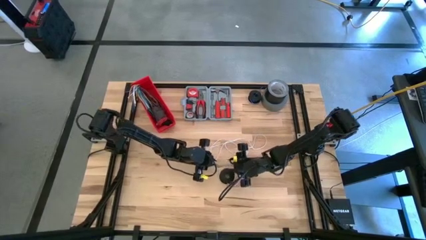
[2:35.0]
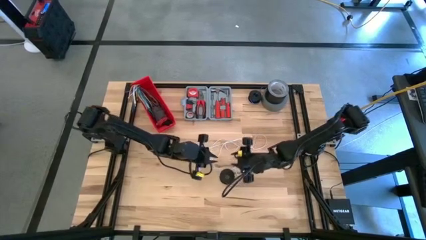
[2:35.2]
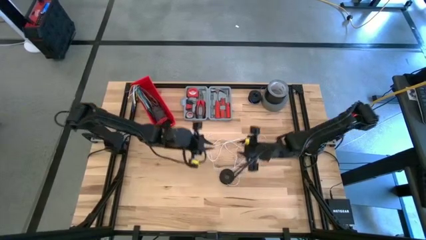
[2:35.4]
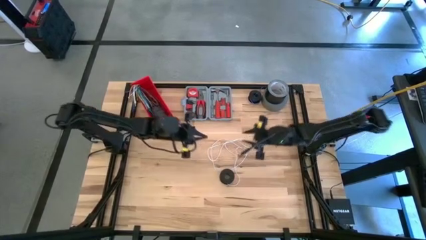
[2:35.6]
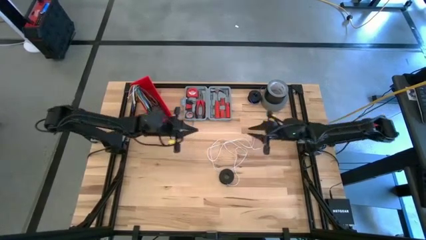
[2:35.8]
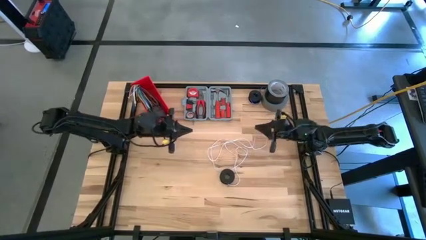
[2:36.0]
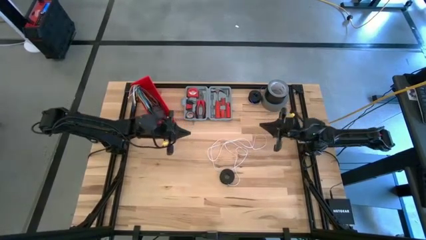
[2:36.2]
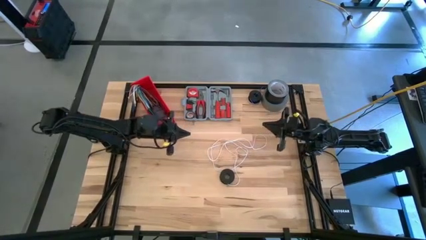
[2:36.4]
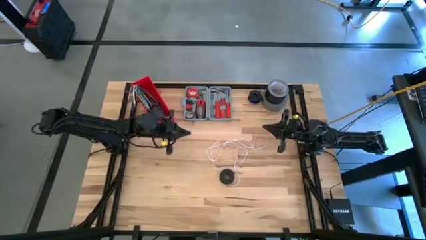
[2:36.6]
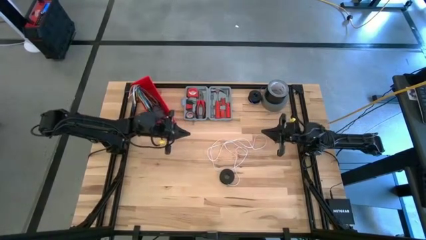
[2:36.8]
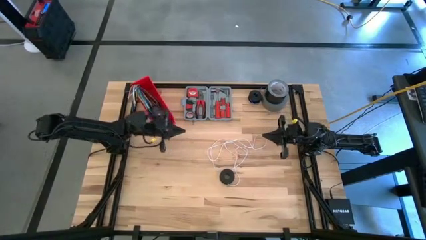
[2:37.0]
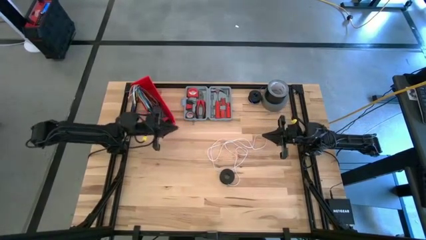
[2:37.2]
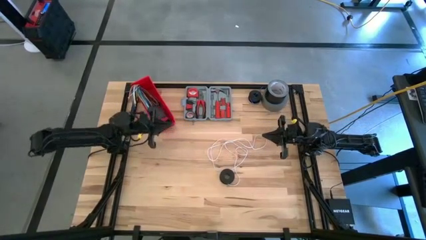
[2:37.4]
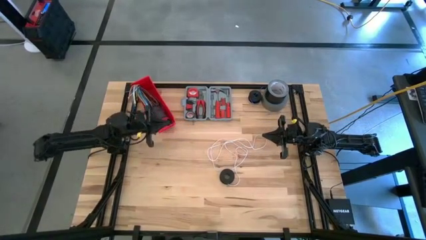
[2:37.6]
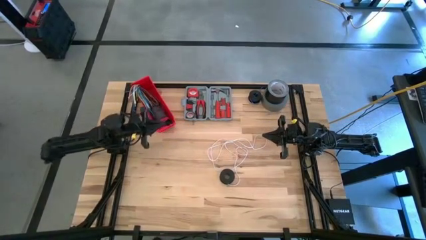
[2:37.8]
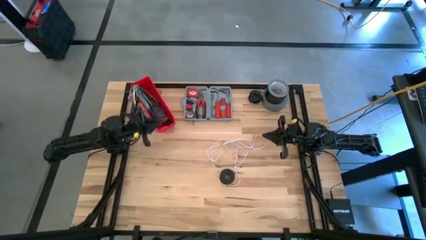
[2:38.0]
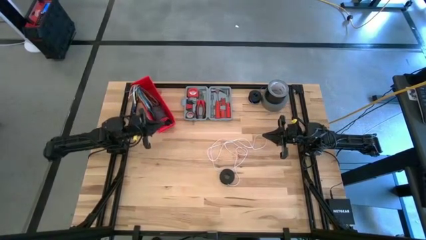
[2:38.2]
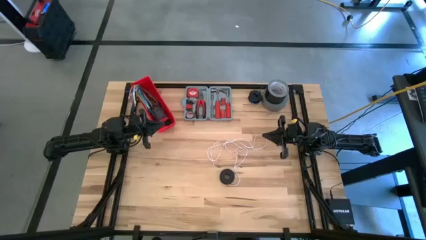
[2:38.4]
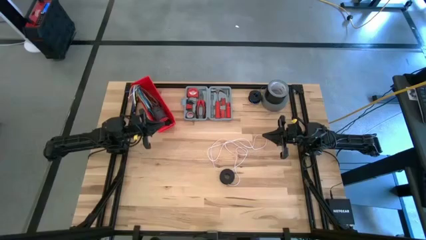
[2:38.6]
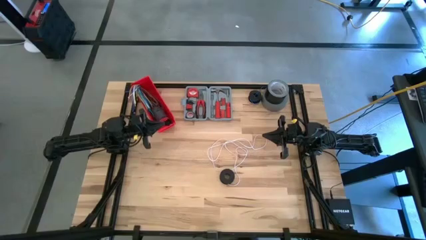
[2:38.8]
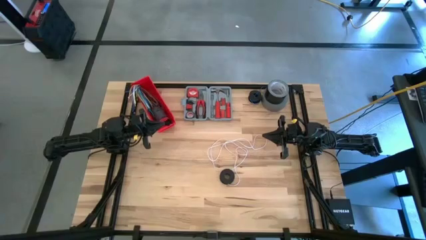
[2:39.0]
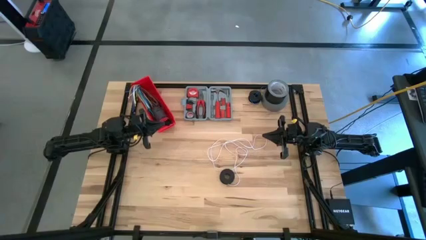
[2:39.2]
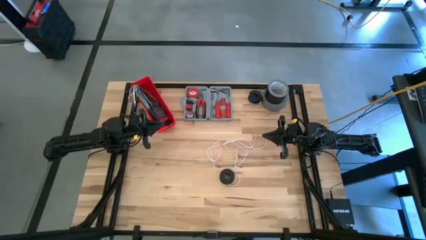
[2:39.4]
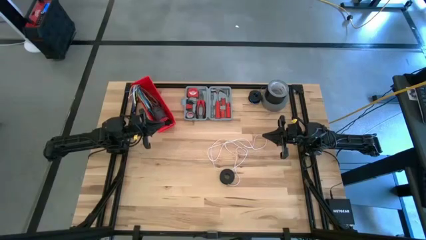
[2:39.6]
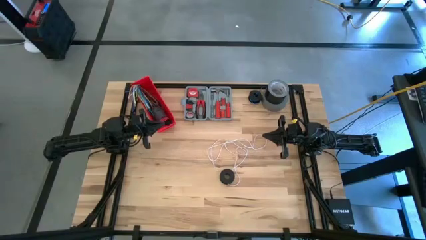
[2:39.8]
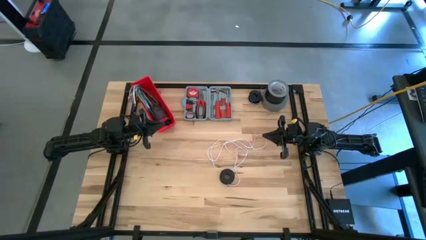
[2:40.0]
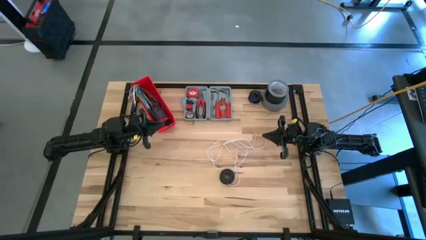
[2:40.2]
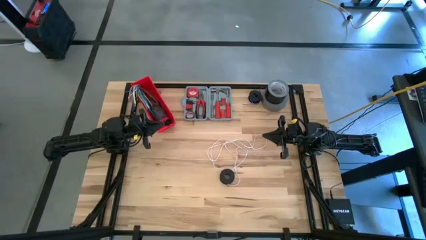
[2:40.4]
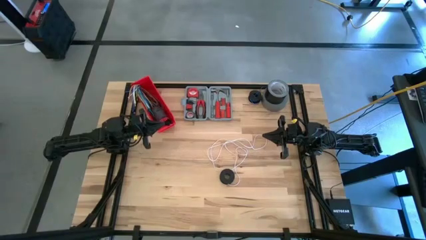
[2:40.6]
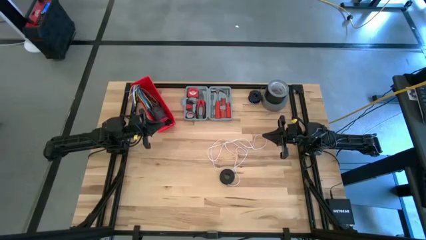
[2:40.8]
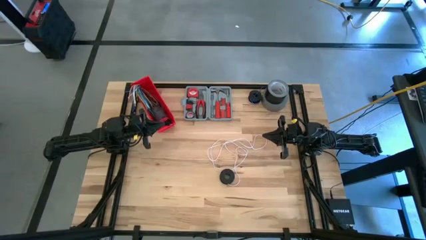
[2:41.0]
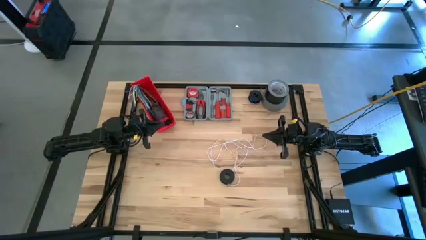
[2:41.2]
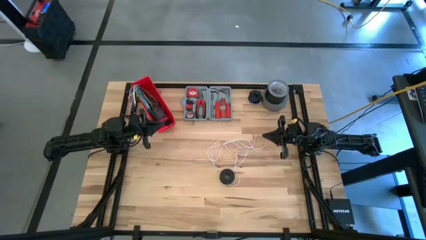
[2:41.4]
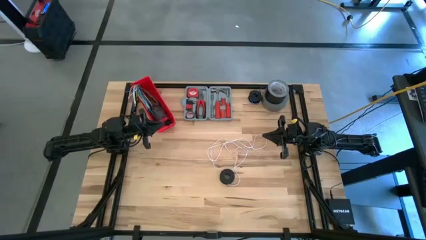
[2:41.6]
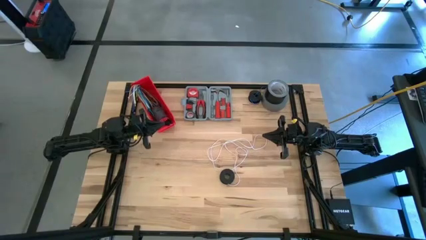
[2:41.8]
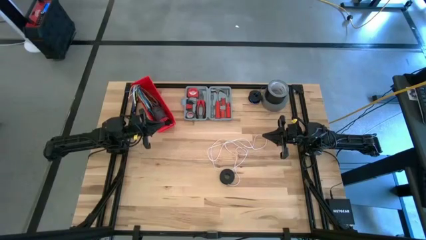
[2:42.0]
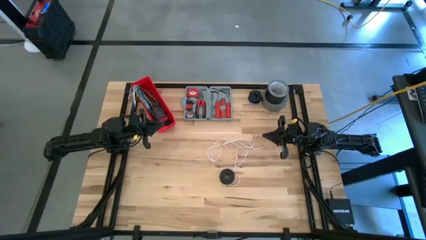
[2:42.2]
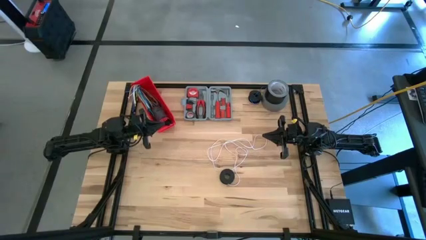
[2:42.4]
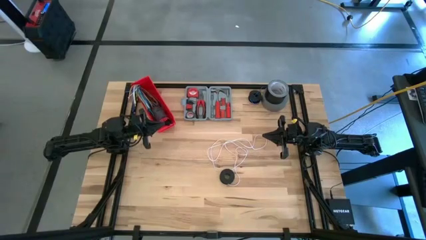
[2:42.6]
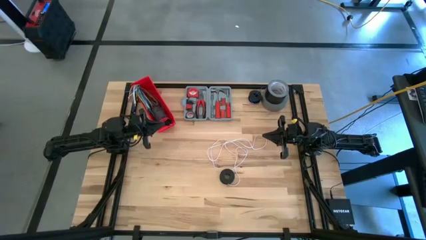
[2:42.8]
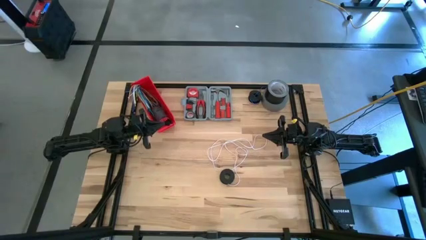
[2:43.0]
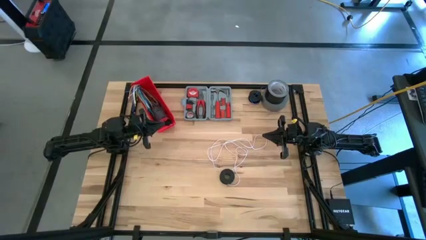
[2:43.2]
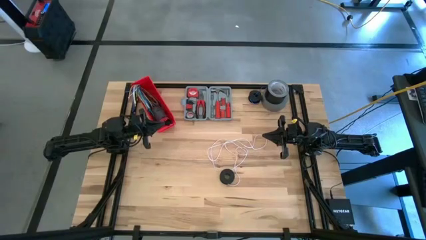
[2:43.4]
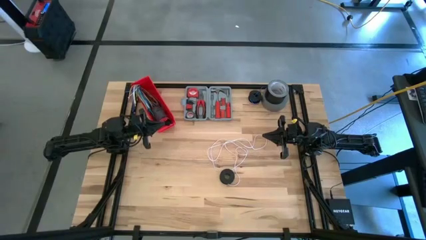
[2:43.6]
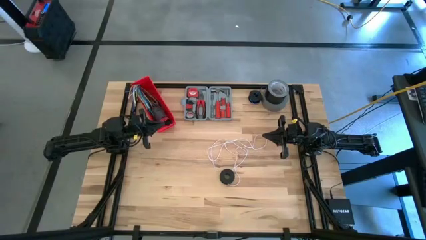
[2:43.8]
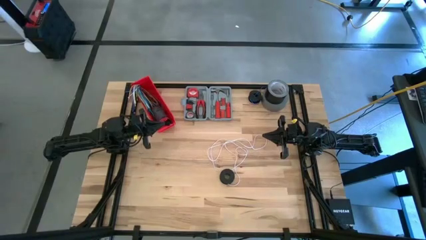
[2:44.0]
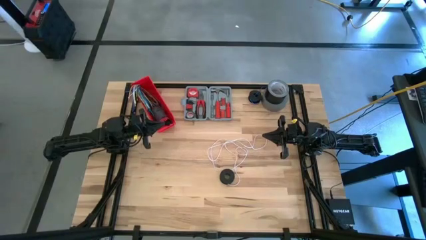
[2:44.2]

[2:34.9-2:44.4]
Task: Coil cords
Return to Home Position

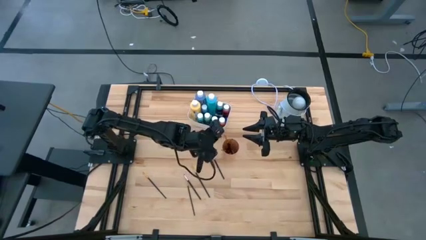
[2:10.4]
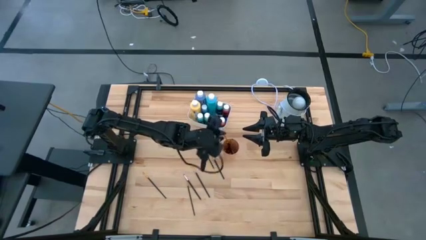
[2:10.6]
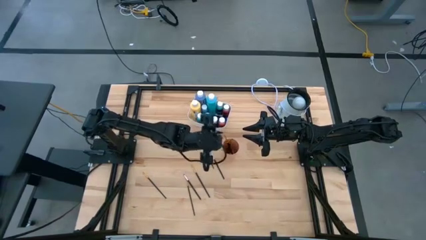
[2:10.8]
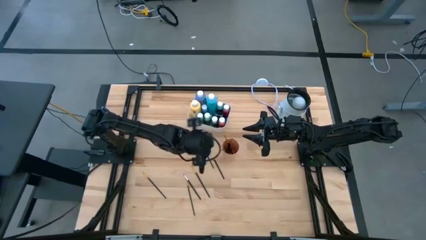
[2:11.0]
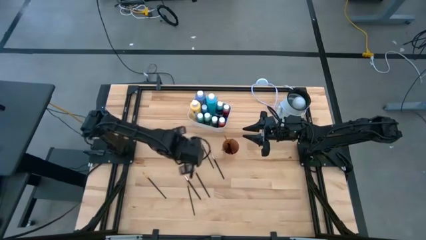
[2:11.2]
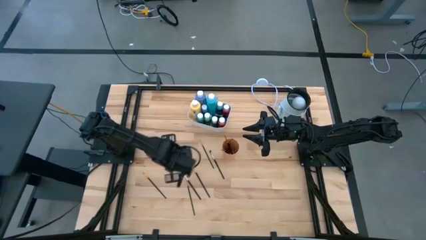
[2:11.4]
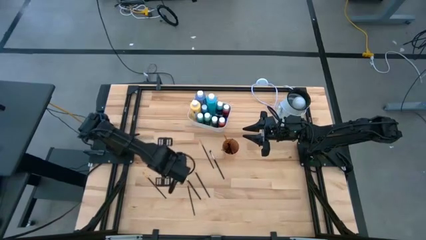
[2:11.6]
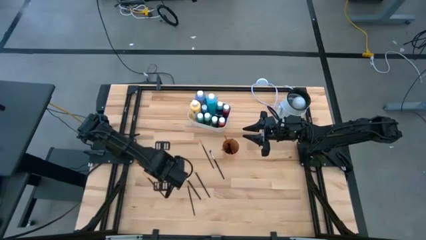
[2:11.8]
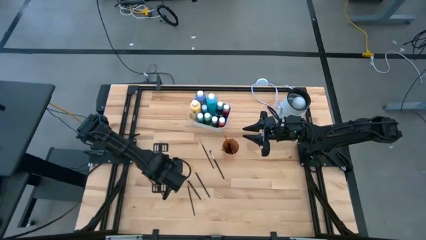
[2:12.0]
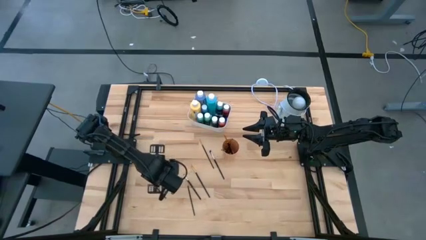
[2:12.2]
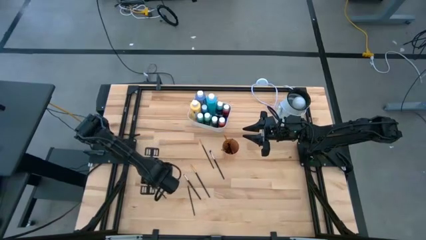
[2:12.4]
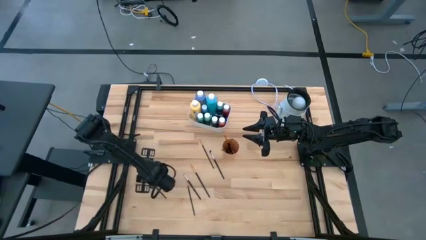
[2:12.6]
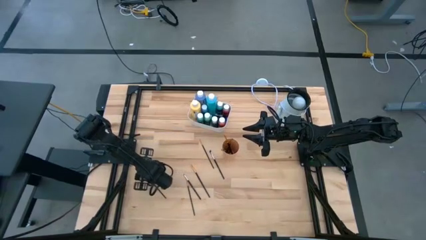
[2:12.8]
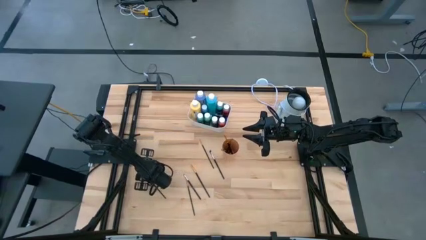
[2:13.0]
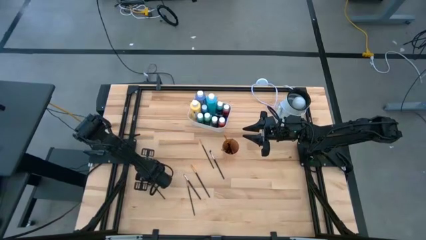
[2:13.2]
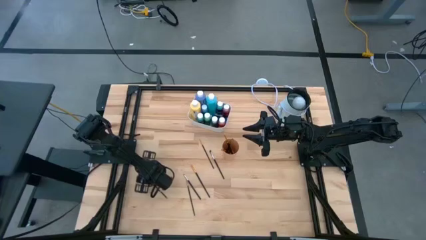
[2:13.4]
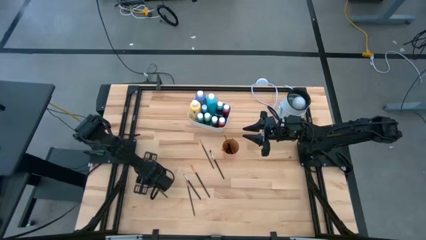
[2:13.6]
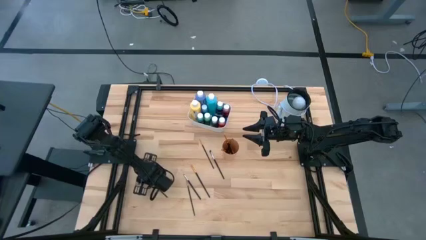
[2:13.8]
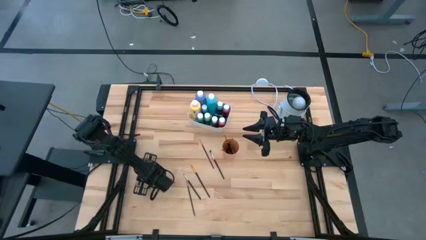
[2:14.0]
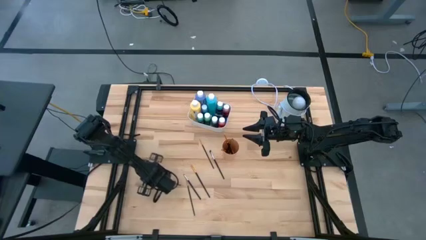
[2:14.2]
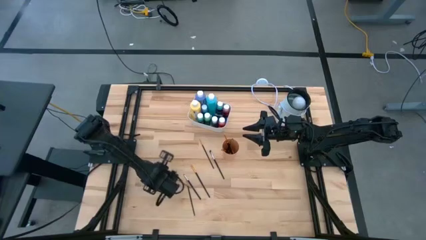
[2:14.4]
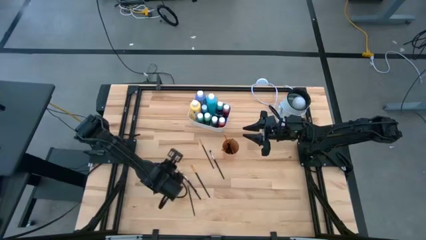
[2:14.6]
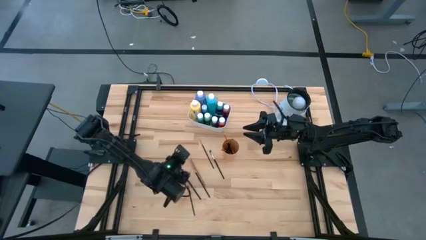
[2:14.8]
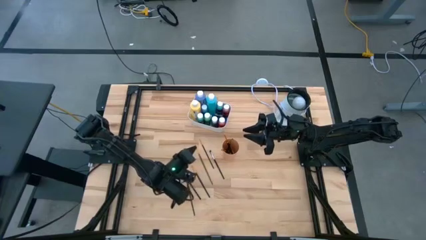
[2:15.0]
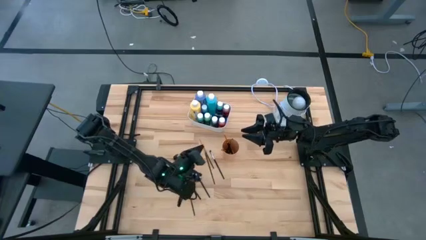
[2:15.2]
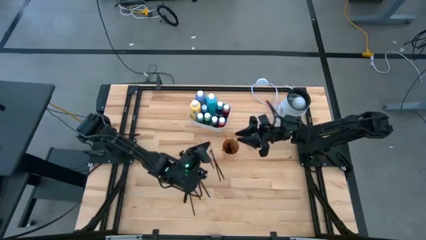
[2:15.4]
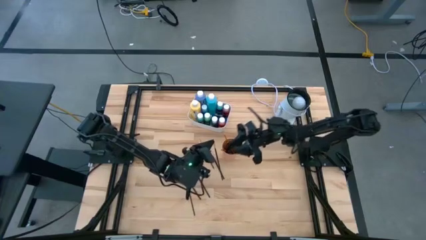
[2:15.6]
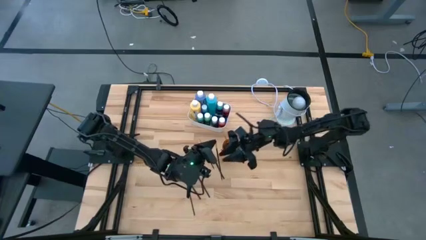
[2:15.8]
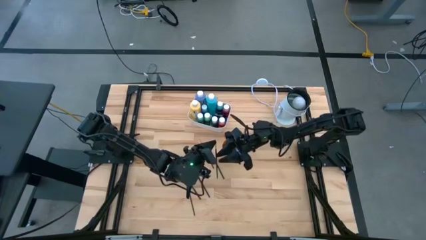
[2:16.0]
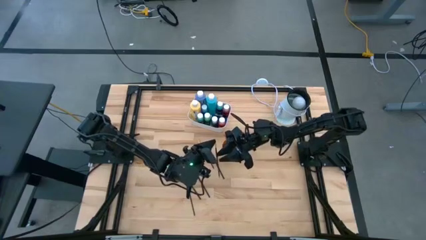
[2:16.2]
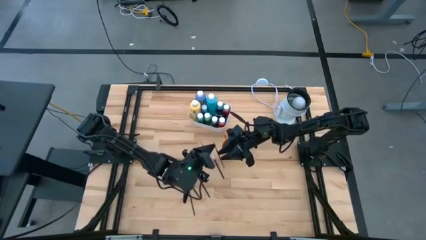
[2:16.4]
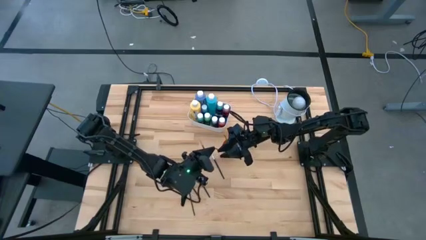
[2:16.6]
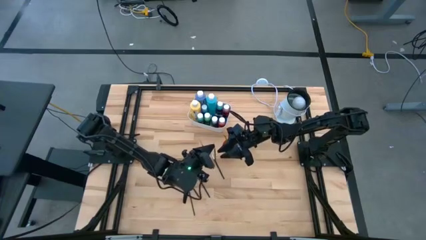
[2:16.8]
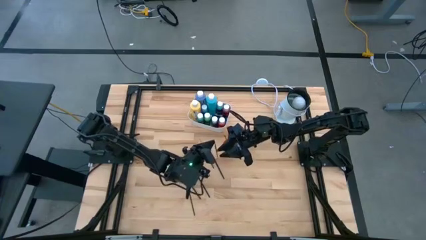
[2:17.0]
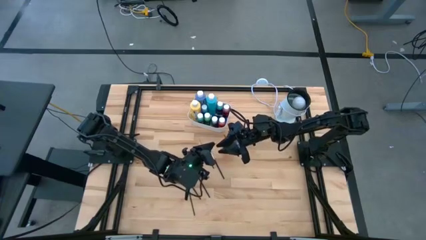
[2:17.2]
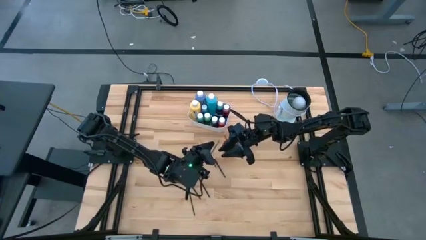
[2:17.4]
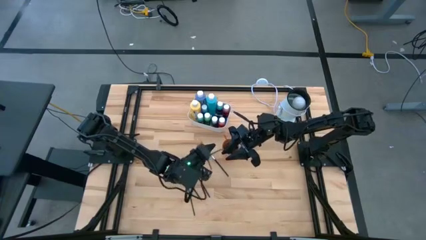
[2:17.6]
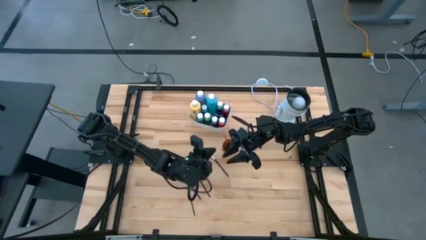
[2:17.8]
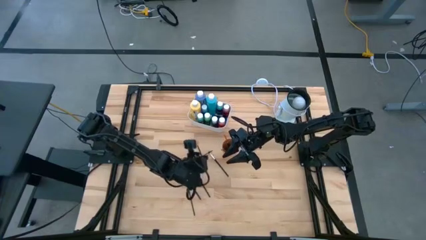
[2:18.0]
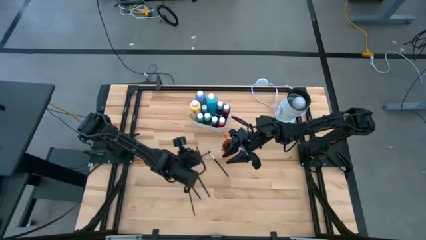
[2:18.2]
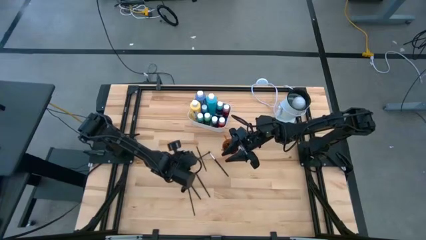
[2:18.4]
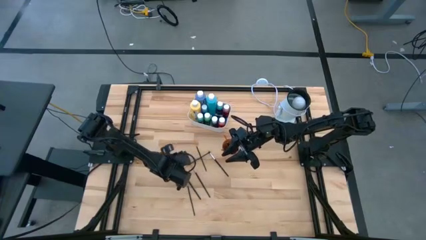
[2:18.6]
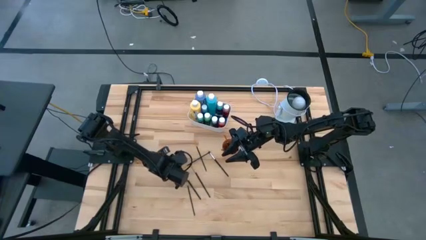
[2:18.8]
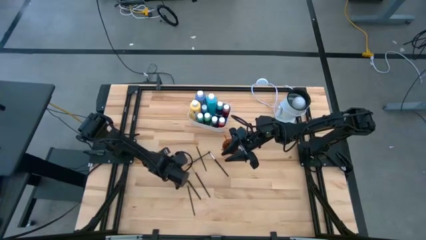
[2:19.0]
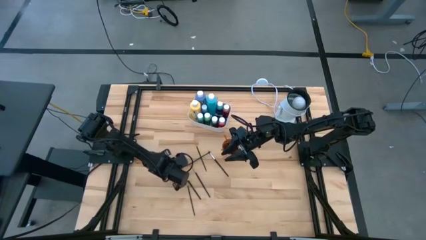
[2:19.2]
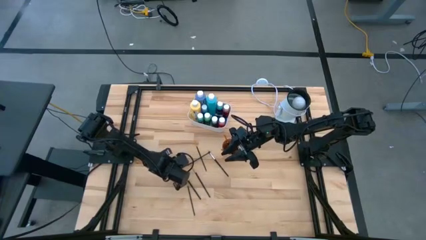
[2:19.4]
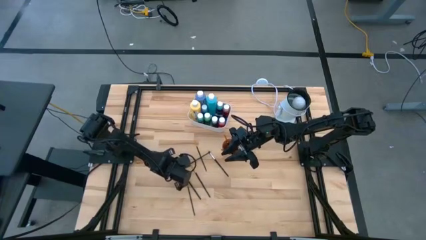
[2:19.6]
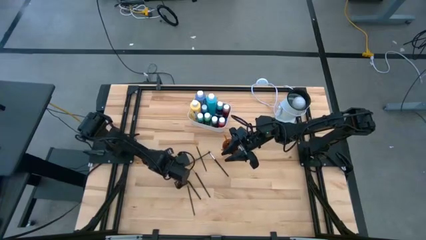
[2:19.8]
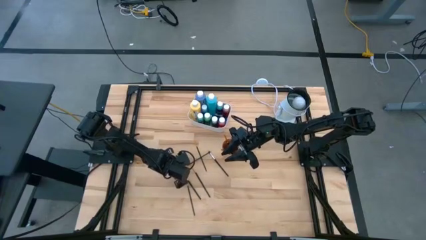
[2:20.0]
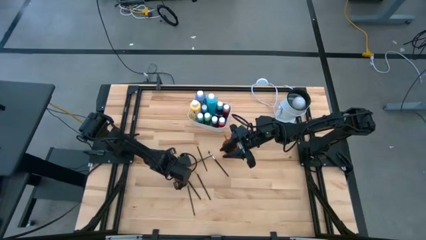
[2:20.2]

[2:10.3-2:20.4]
Task: Pick & Place Paint Supplies
Put the black paint brush into the orange cup
